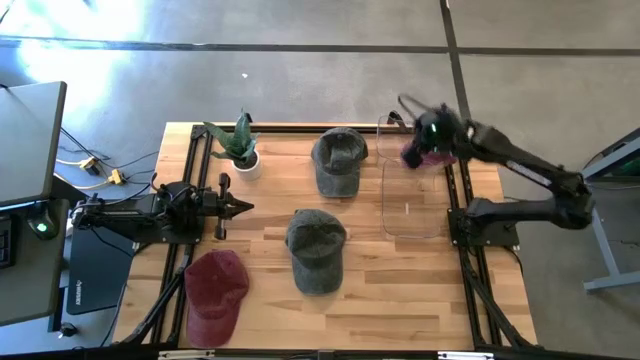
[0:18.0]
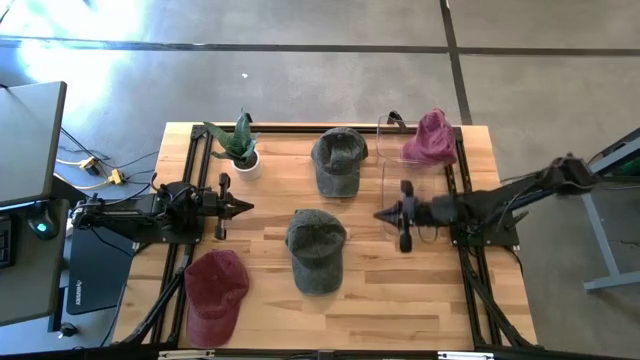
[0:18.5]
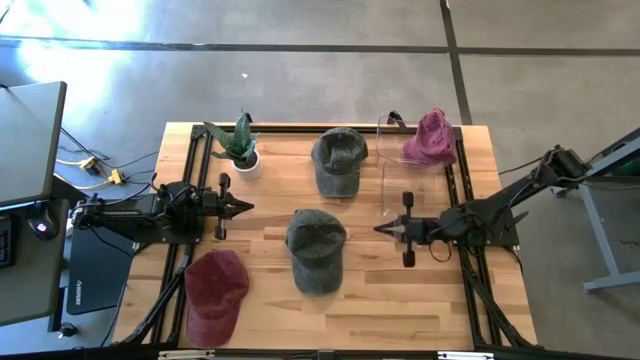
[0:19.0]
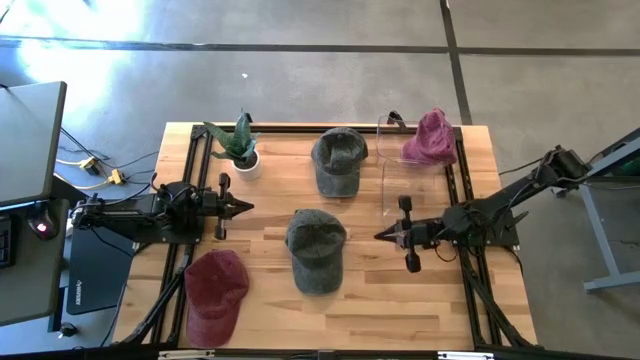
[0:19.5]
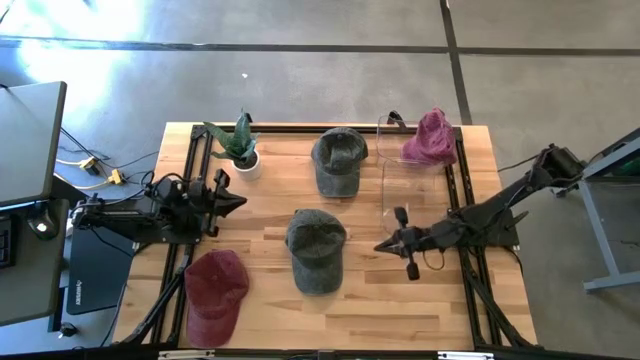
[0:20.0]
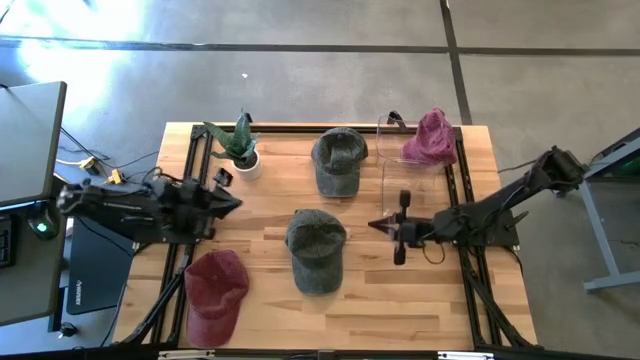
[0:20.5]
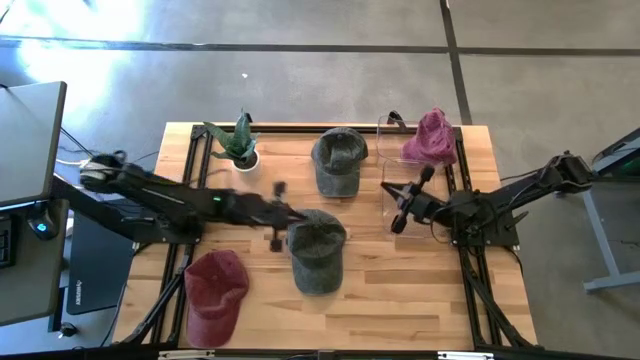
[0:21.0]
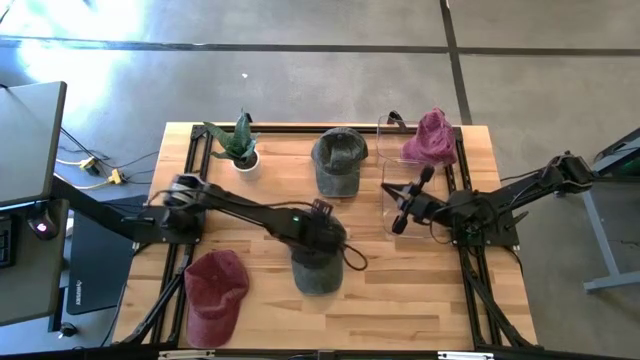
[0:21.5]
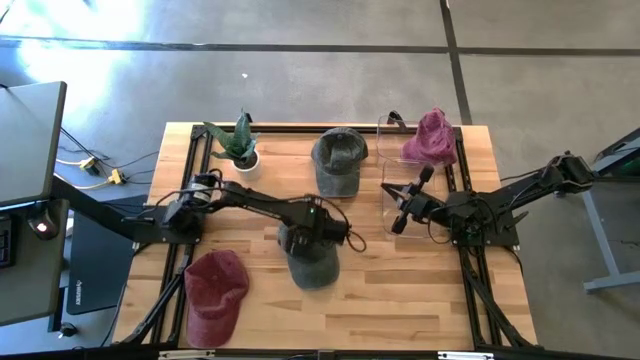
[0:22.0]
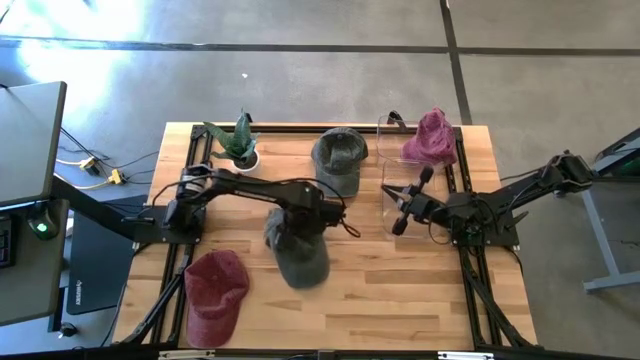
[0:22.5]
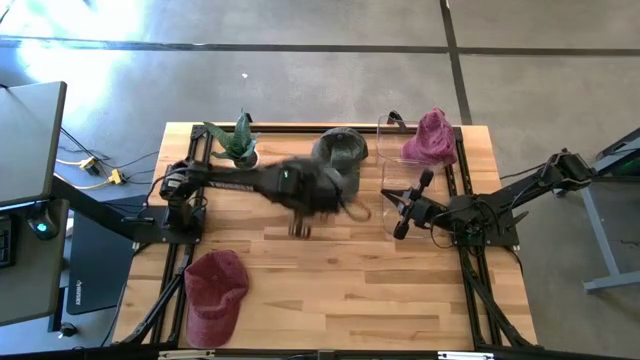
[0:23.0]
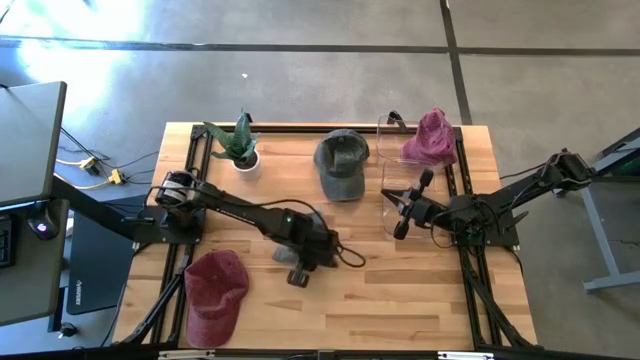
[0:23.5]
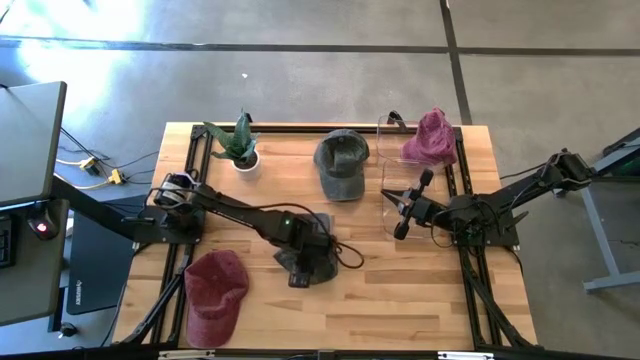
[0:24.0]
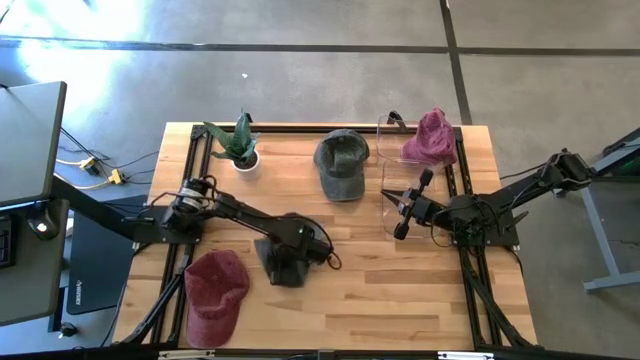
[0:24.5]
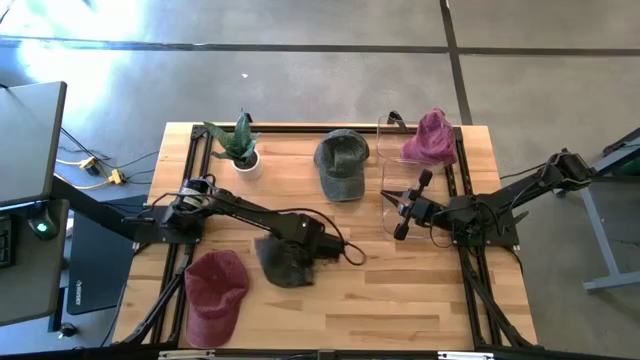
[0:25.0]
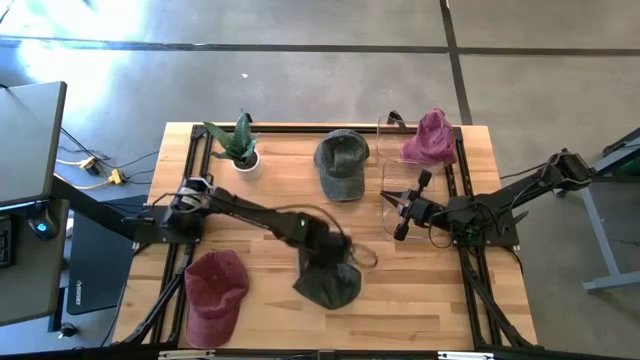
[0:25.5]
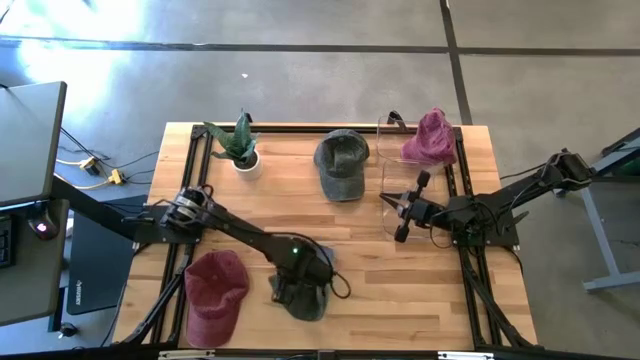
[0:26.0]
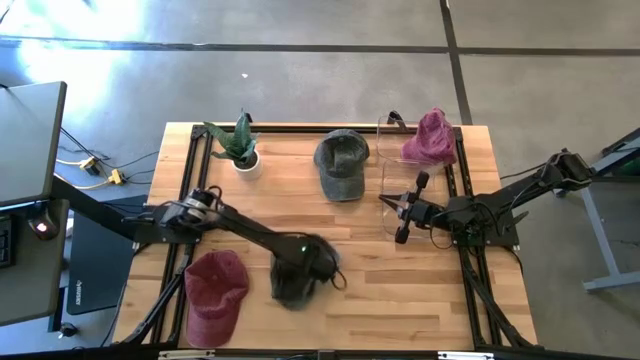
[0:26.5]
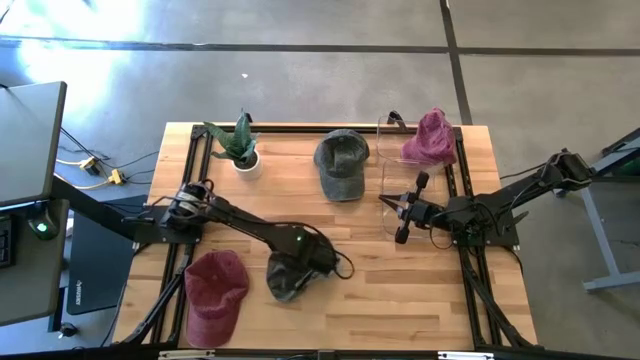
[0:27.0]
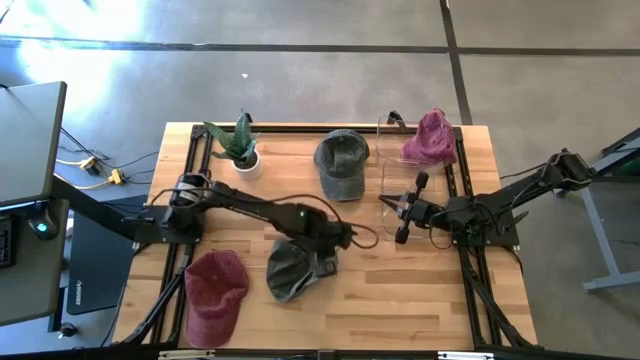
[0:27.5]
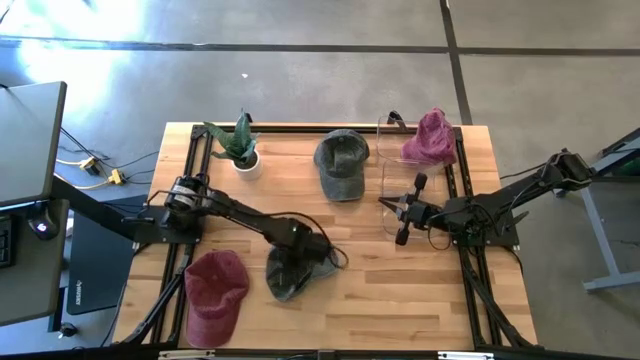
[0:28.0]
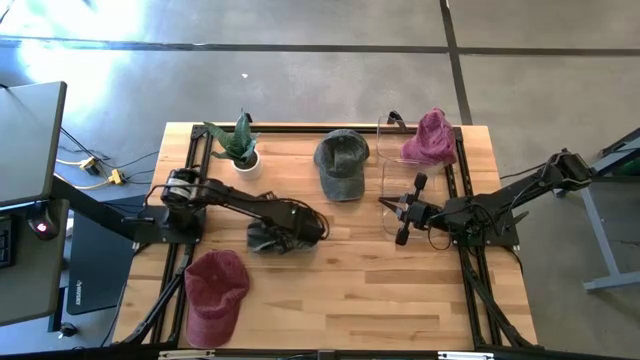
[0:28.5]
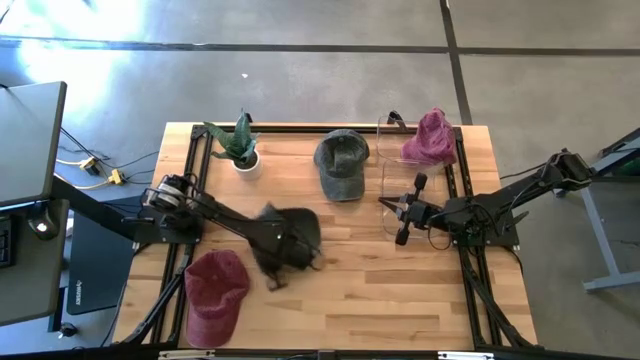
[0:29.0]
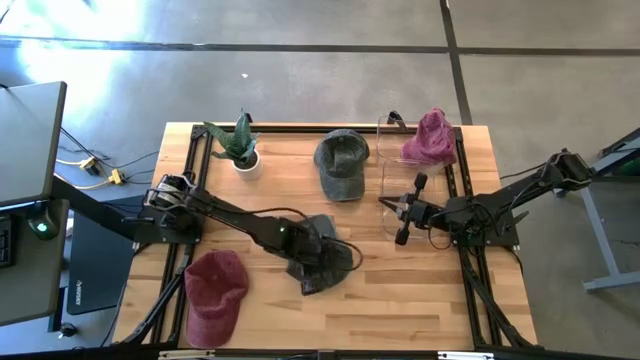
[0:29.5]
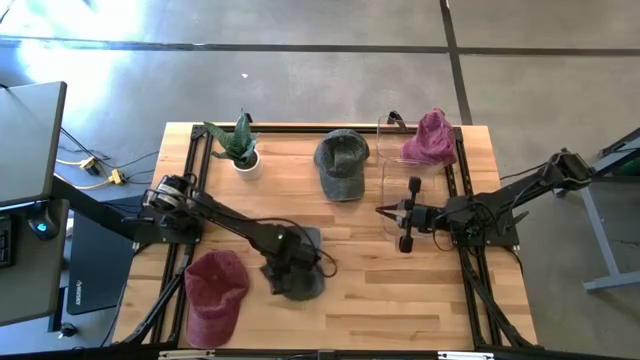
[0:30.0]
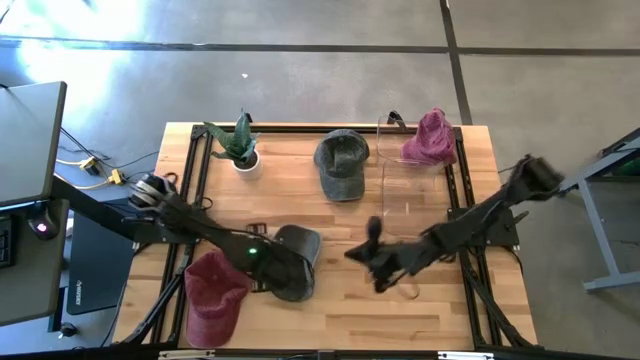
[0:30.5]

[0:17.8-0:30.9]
Task: Pick & Place hat
Put the bottom gray cap into the bottom transparent bin

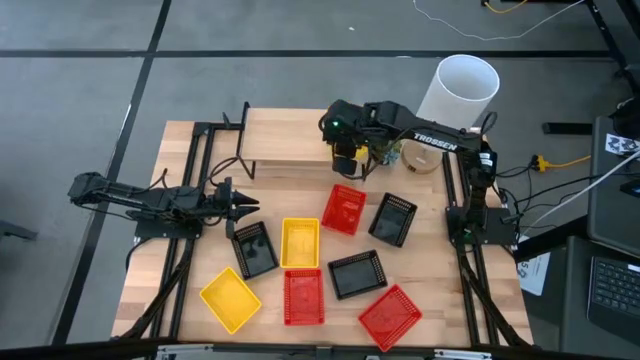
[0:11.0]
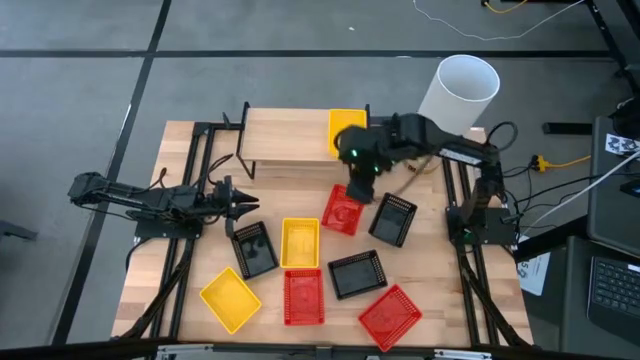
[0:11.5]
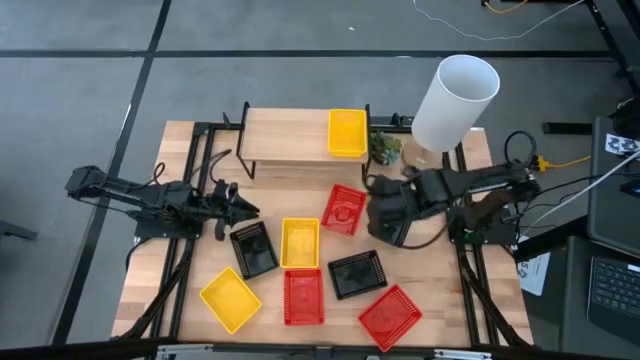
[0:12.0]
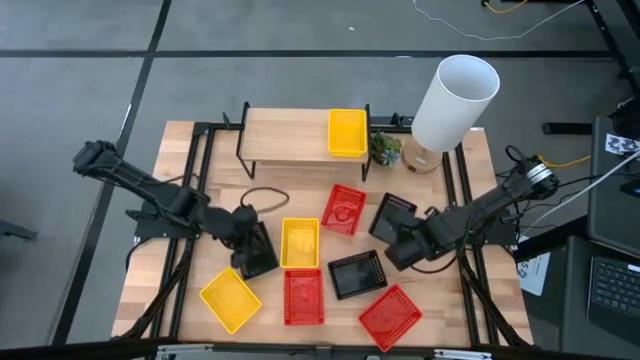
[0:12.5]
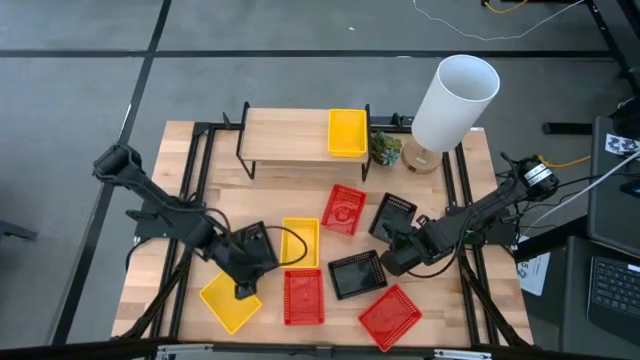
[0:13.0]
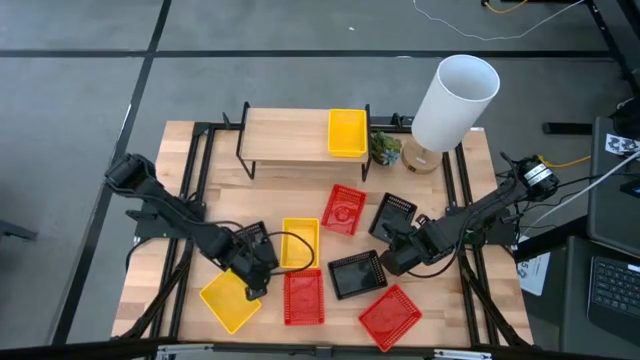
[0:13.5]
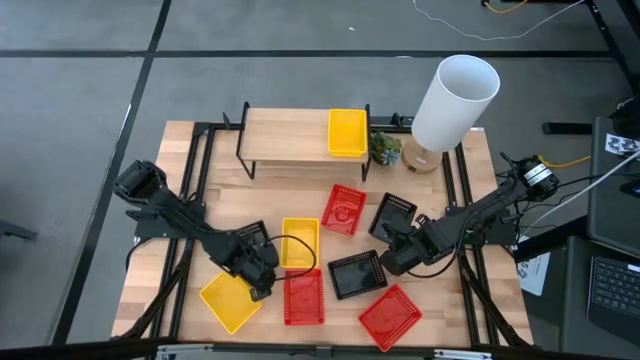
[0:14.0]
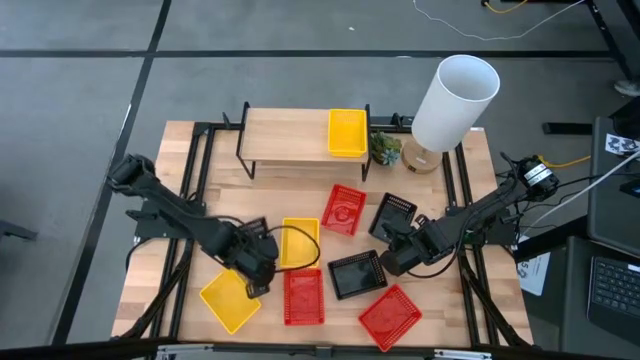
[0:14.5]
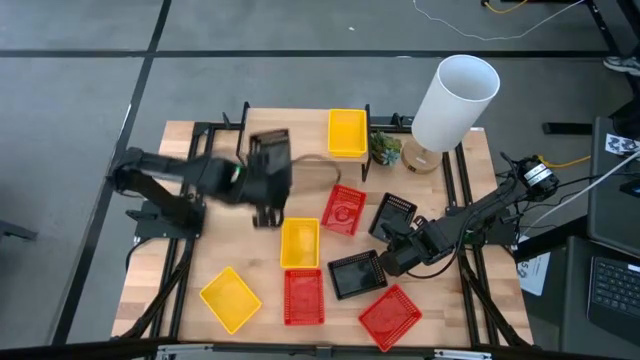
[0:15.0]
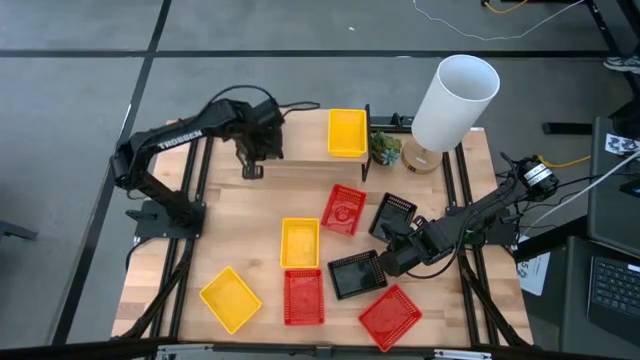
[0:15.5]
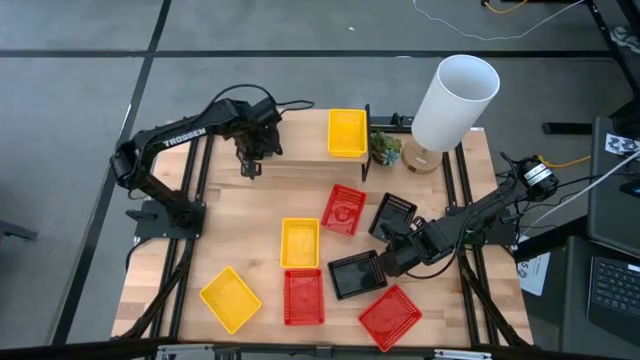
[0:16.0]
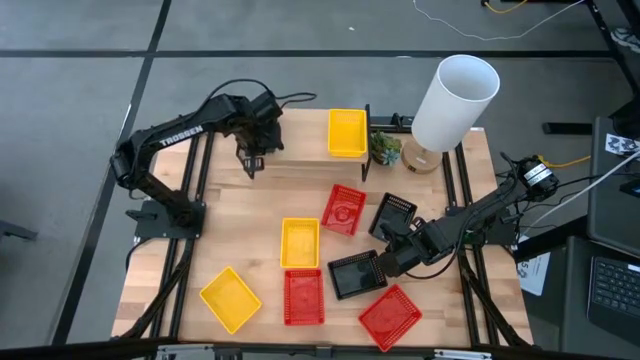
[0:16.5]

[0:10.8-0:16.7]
Task: Stack baskets on shelf by color
Put the middle left black bin on the shelf
